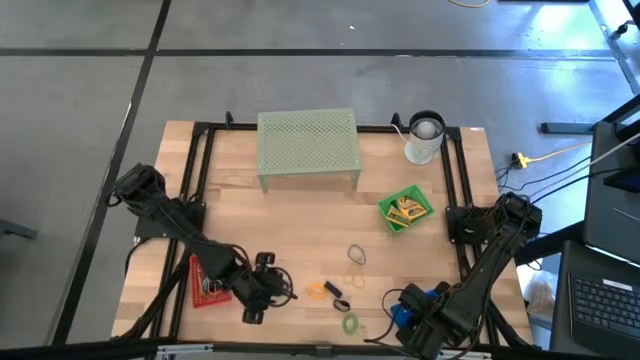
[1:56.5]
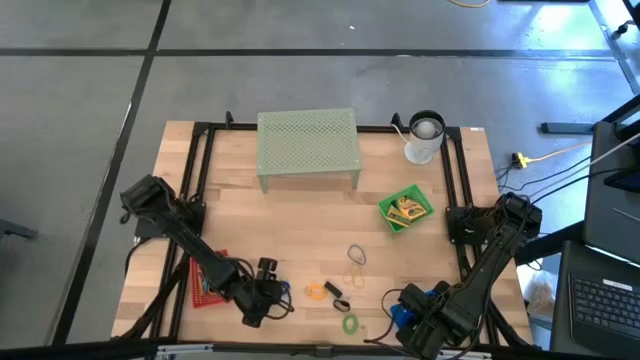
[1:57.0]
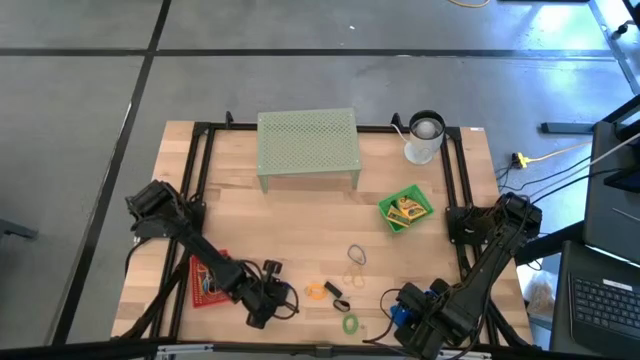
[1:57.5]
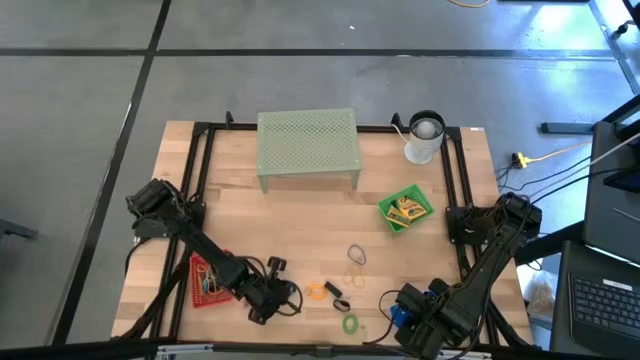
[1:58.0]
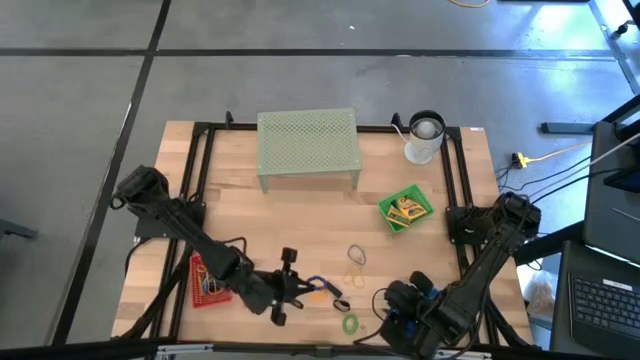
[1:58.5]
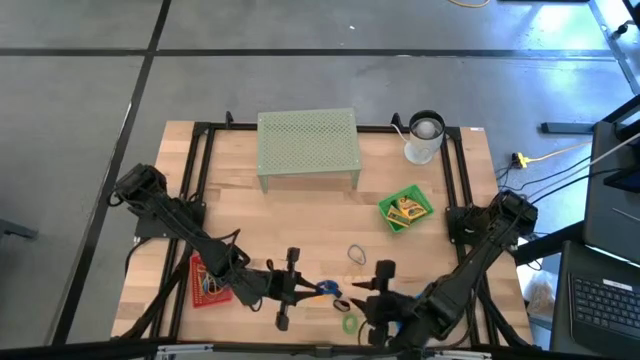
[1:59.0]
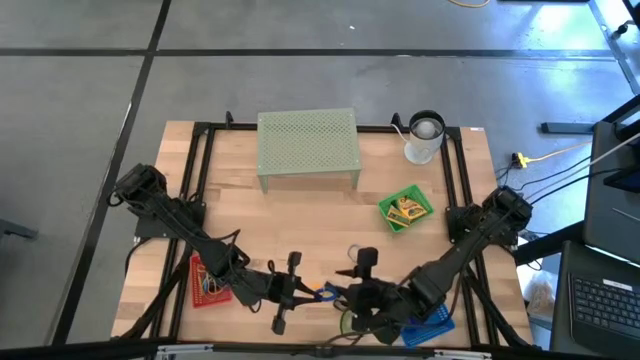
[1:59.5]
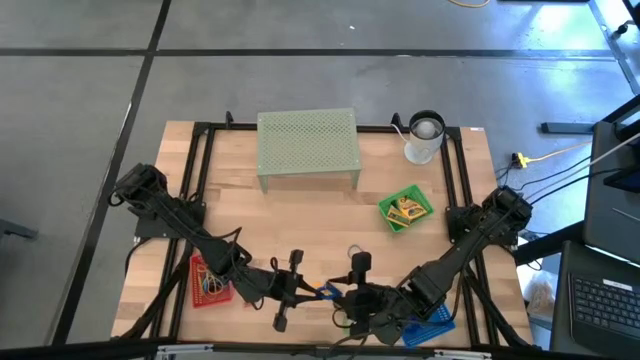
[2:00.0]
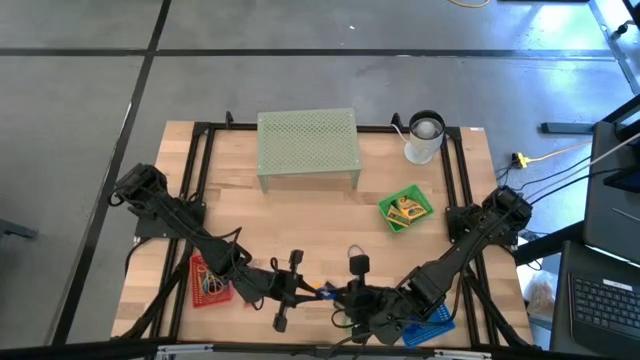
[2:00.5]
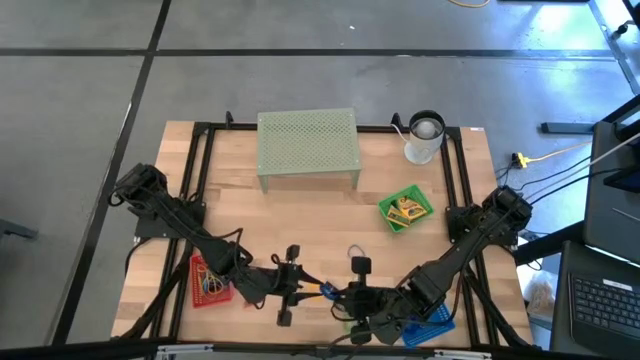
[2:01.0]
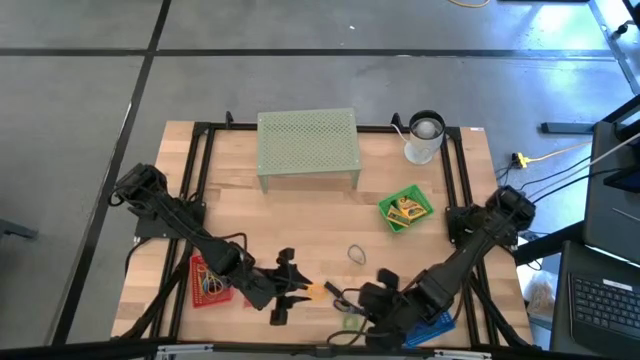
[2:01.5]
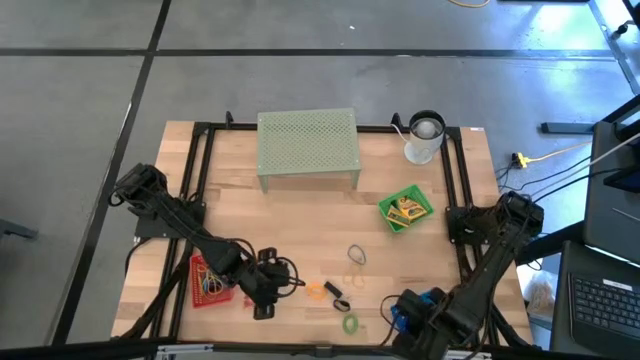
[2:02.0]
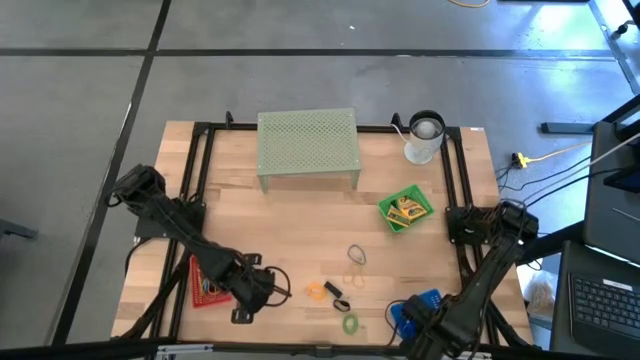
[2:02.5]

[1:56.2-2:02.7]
Task: Pick & Place Office Desk Supplies
Put the blue spring rubber band into the blue bin

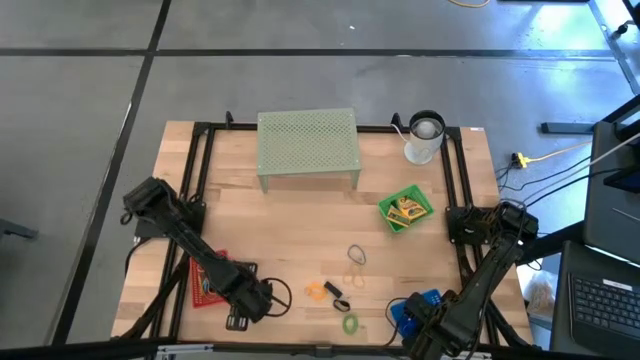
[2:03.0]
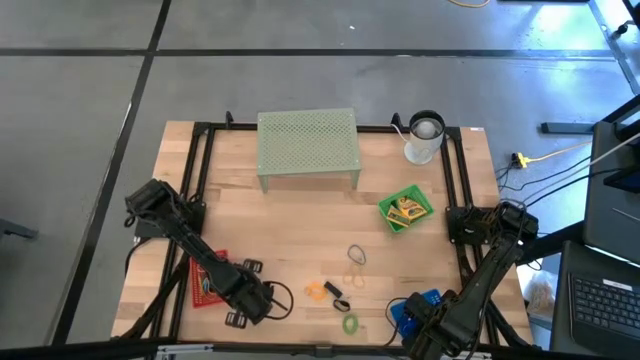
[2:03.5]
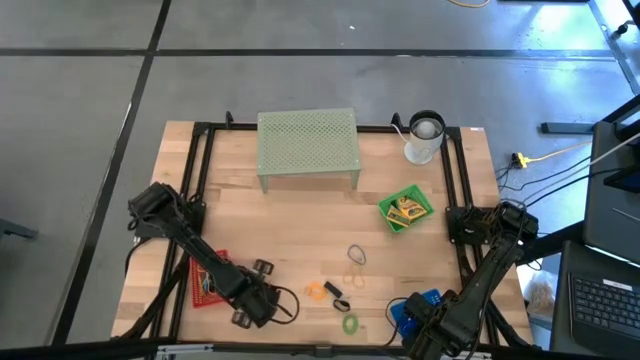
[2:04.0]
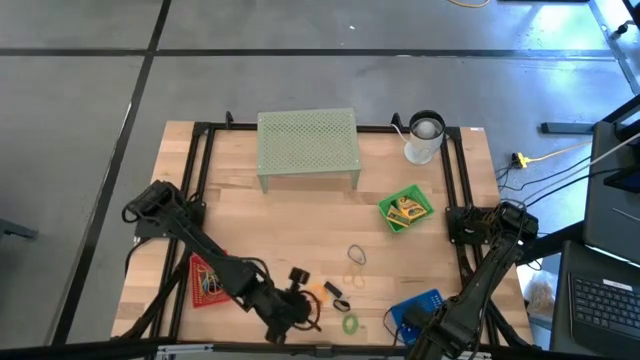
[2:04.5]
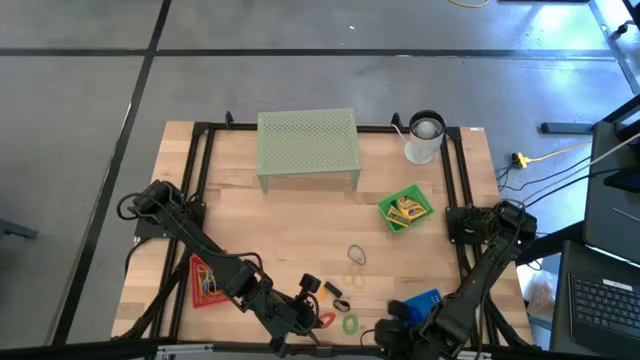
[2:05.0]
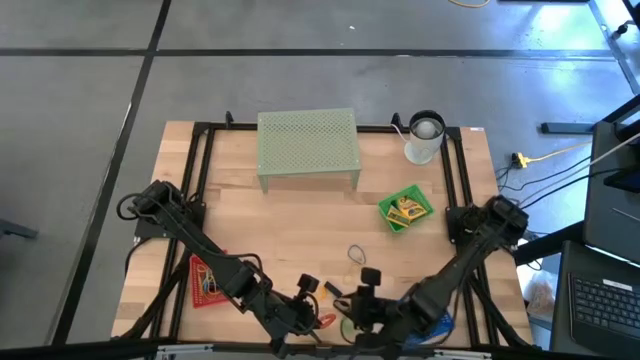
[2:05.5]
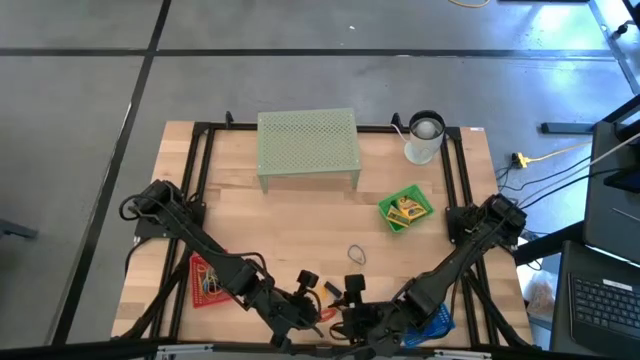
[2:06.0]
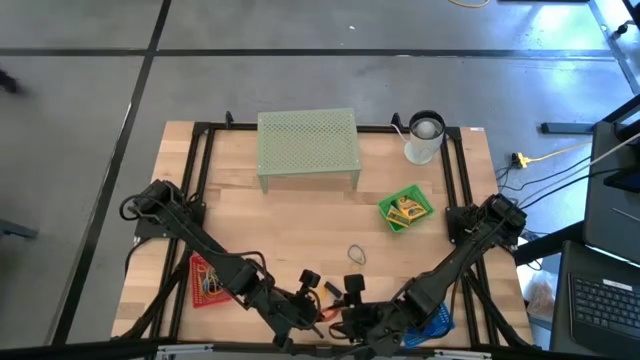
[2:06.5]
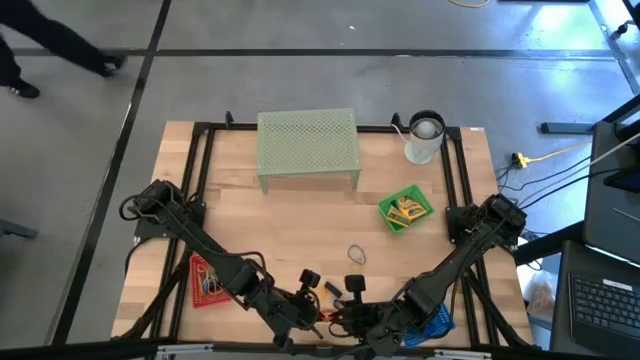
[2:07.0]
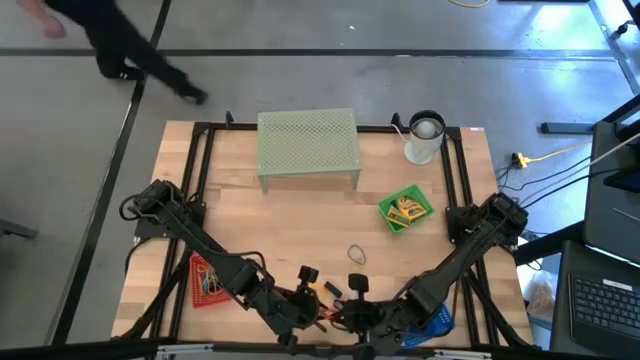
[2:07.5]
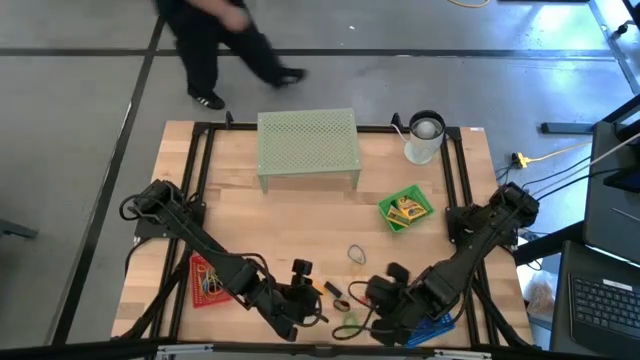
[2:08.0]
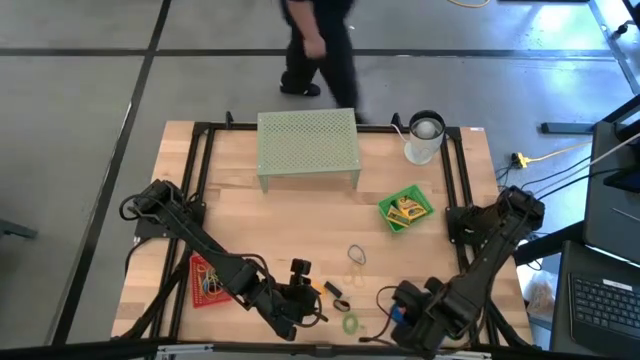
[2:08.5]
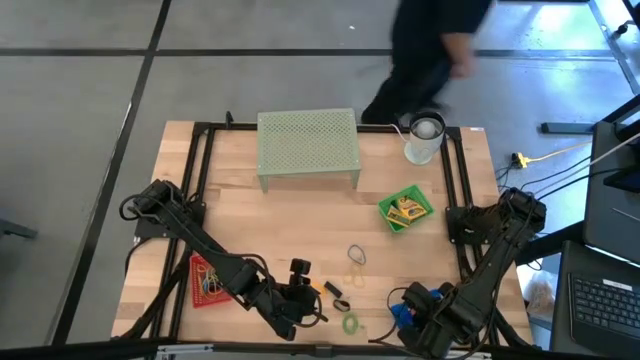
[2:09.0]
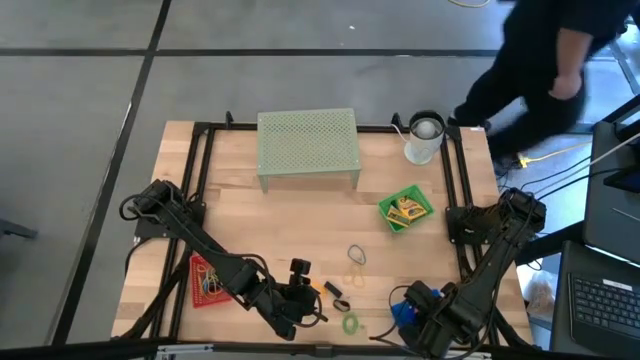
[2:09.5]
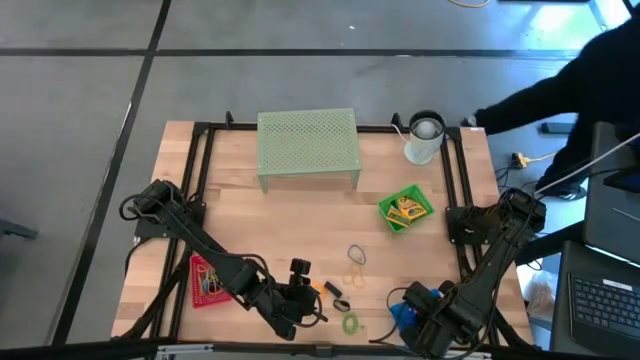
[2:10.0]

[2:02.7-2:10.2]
Put the orange spring rubber band into the blue bin

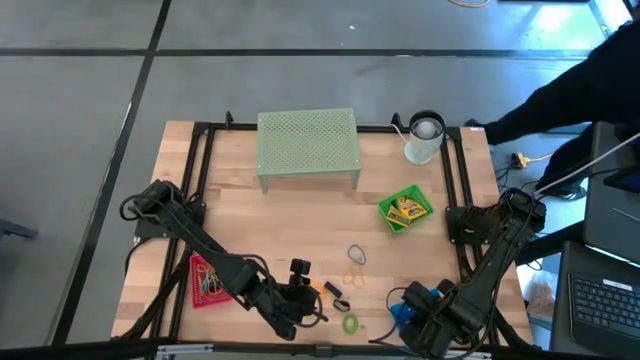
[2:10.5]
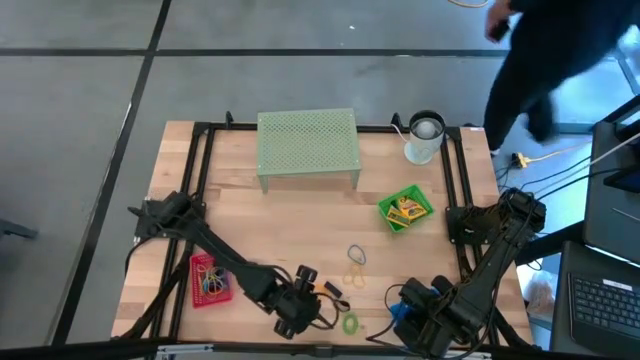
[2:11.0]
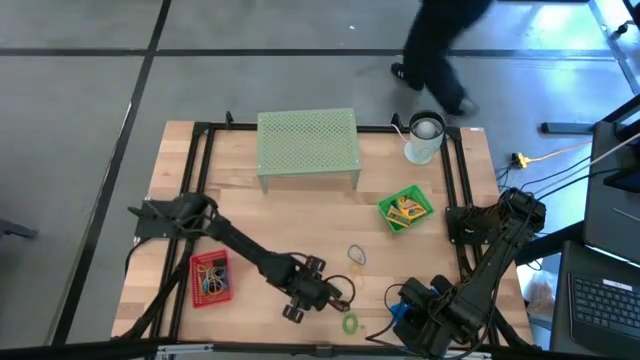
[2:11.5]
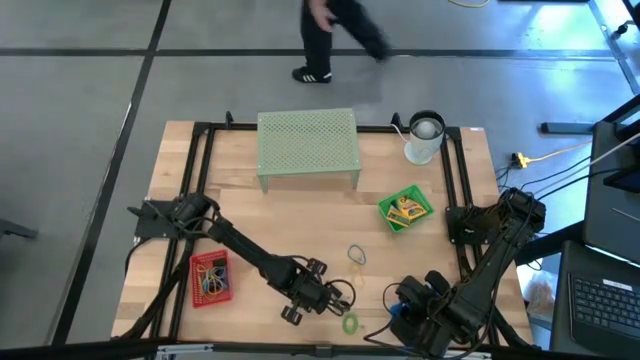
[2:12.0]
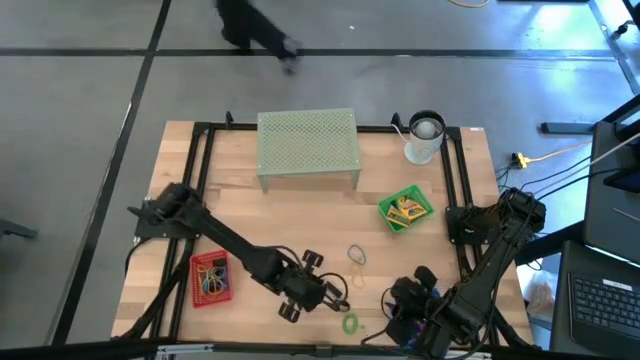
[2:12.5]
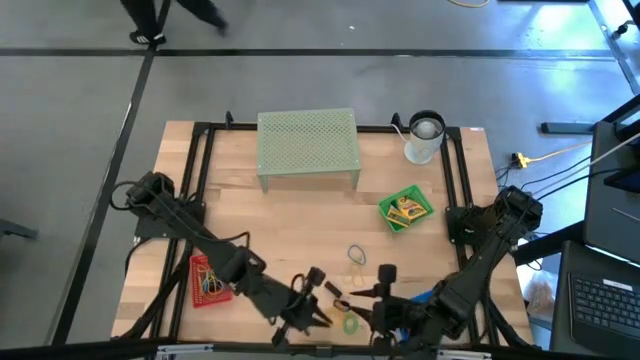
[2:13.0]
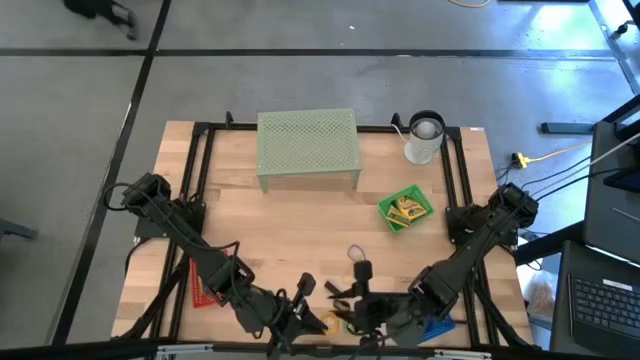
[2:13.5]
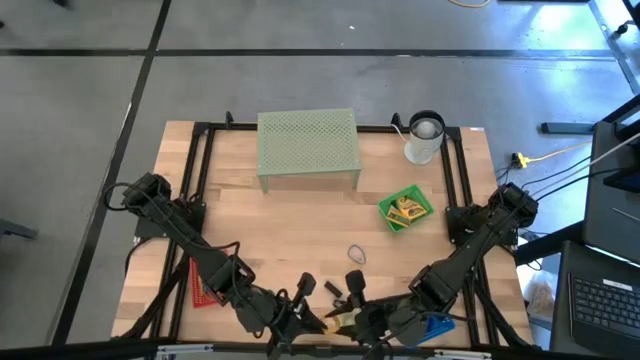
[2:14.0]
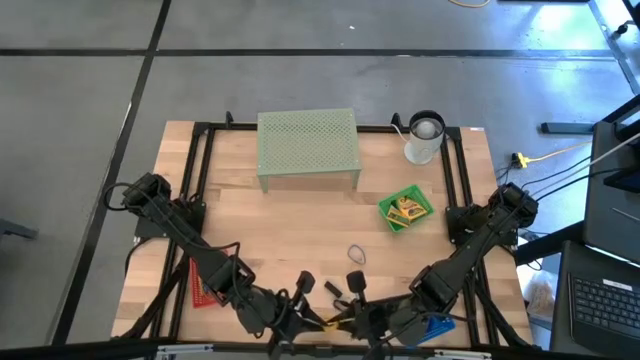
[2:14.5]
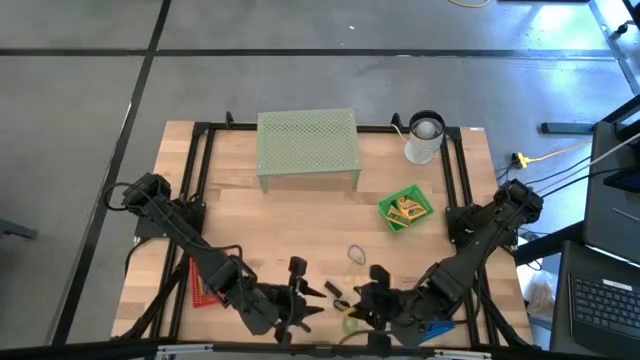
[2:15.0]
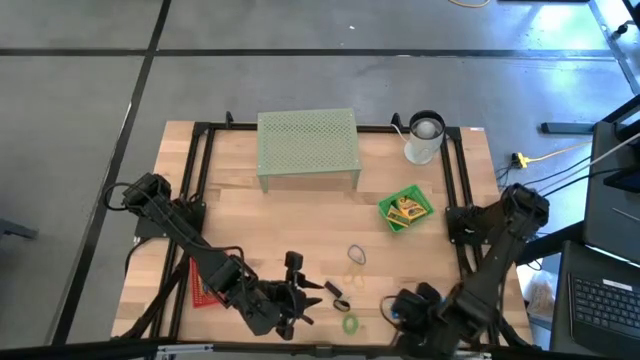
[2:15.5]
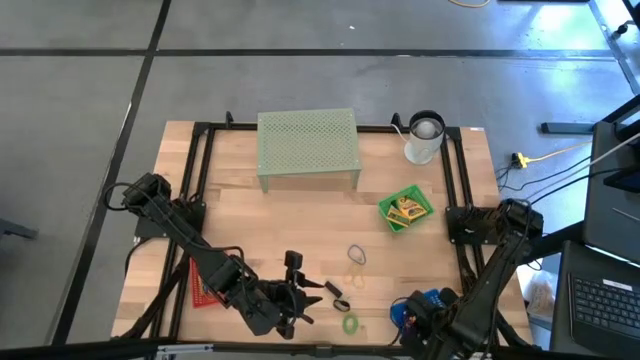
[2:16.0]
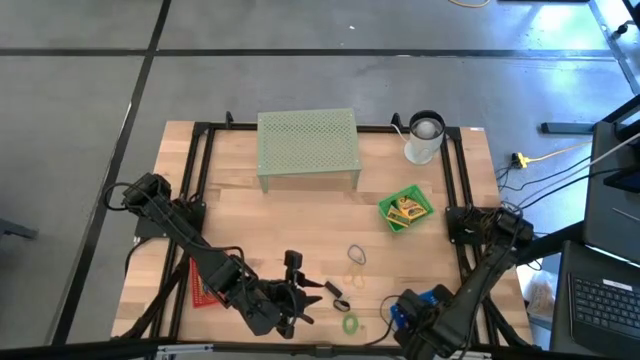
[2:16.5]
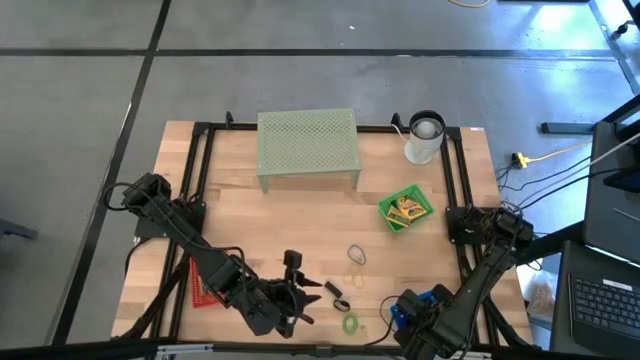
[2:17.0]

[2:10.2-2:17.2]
Put the yellow spring rubber band into the blue bin
